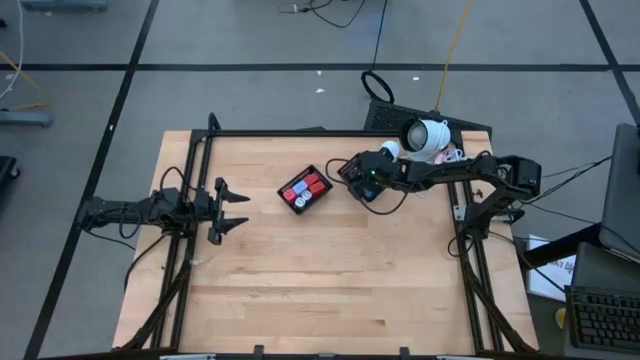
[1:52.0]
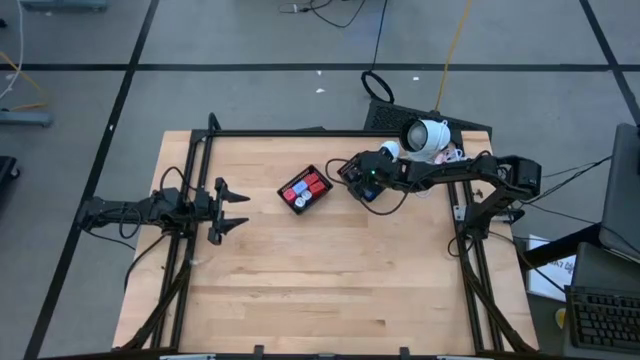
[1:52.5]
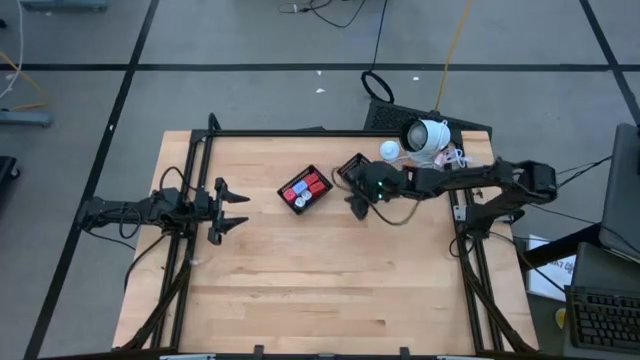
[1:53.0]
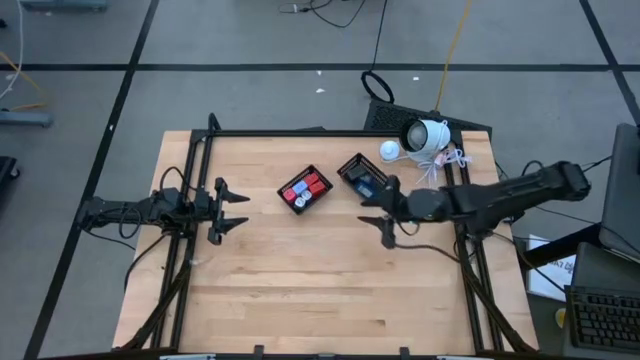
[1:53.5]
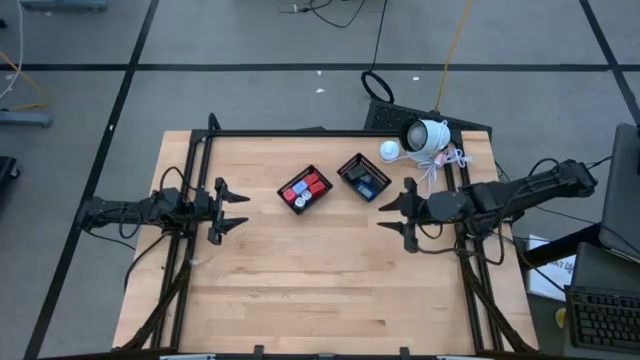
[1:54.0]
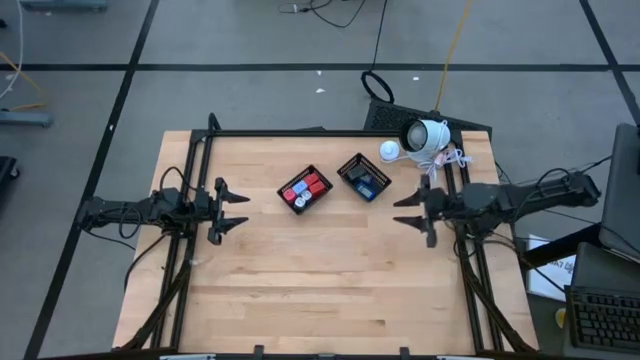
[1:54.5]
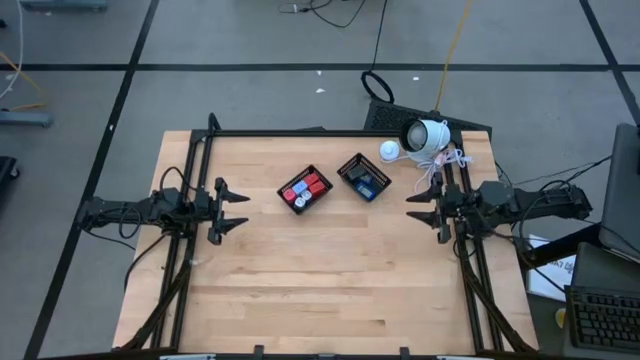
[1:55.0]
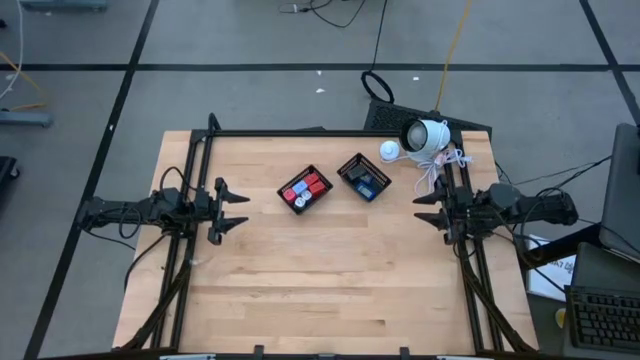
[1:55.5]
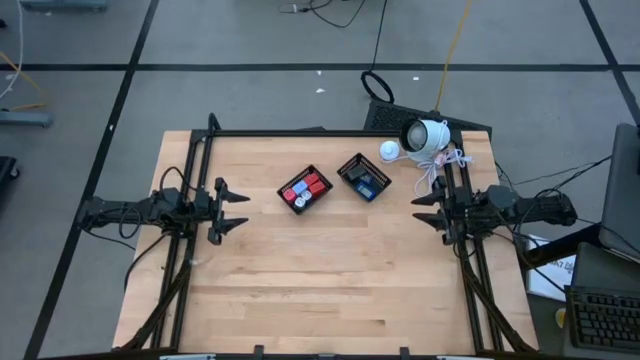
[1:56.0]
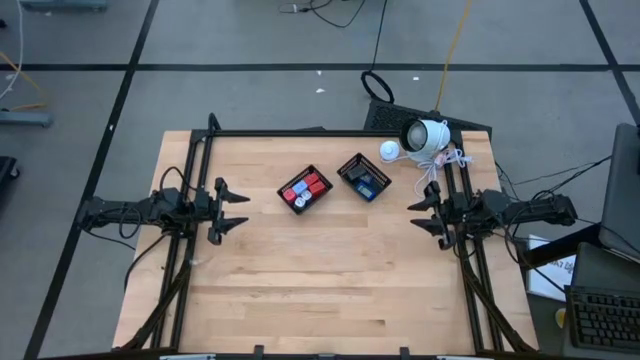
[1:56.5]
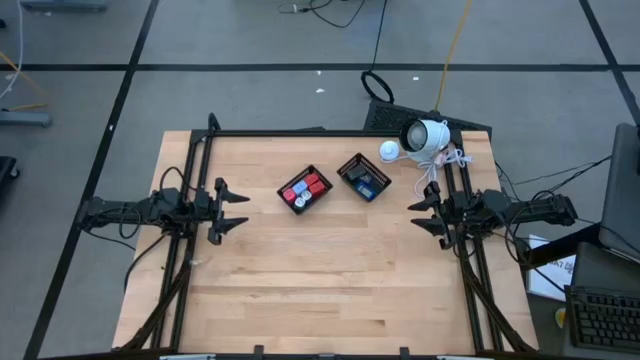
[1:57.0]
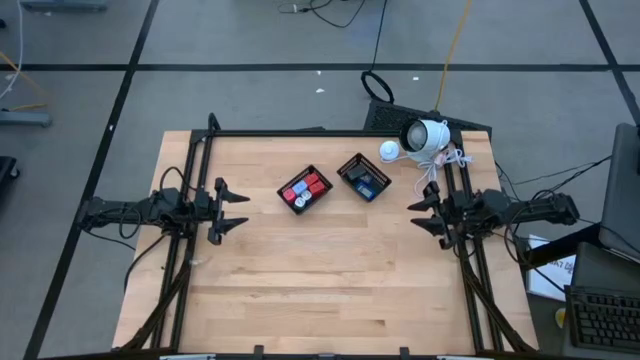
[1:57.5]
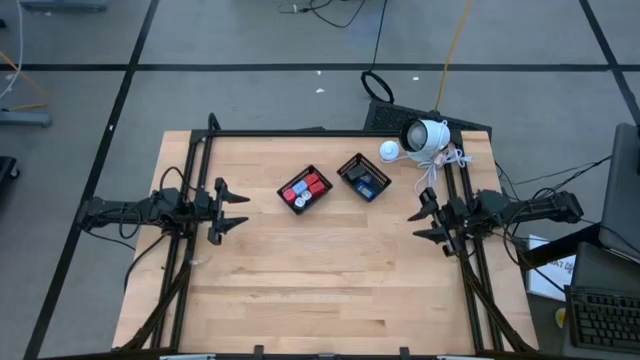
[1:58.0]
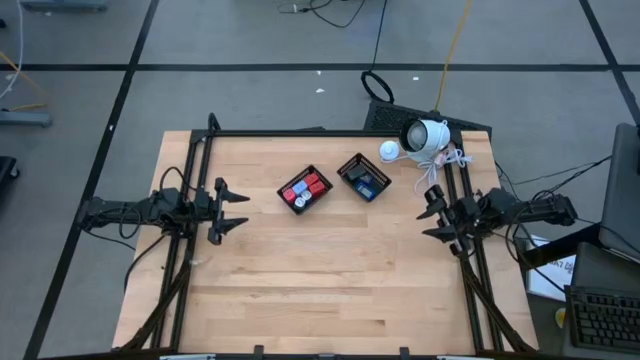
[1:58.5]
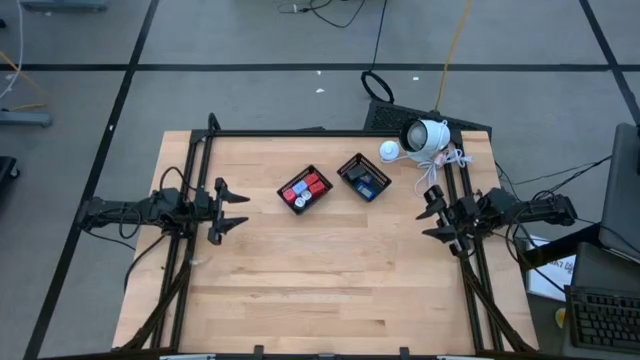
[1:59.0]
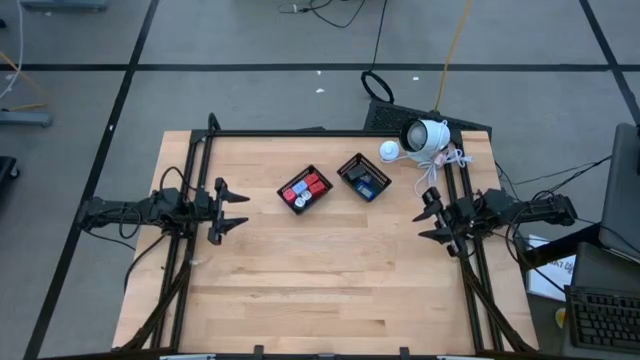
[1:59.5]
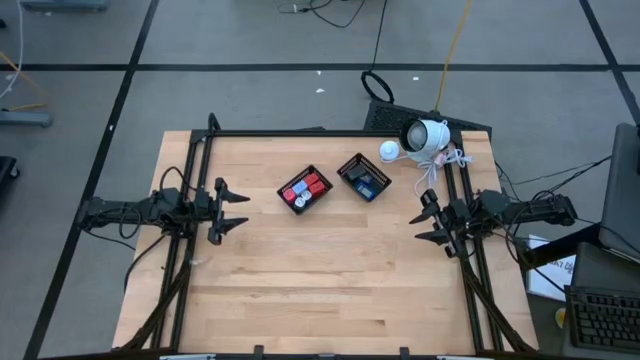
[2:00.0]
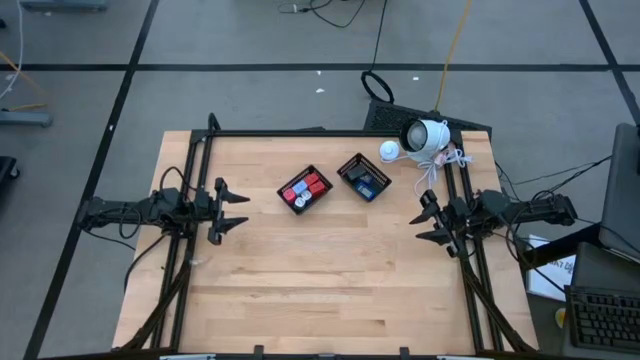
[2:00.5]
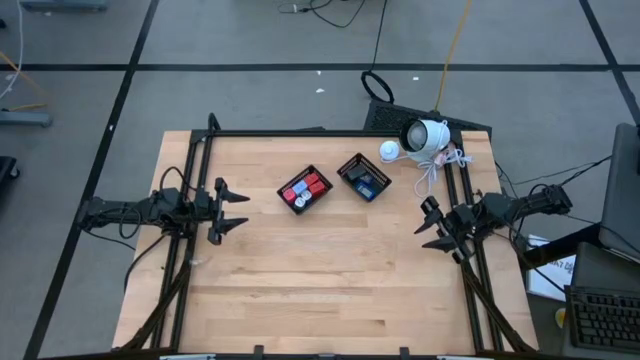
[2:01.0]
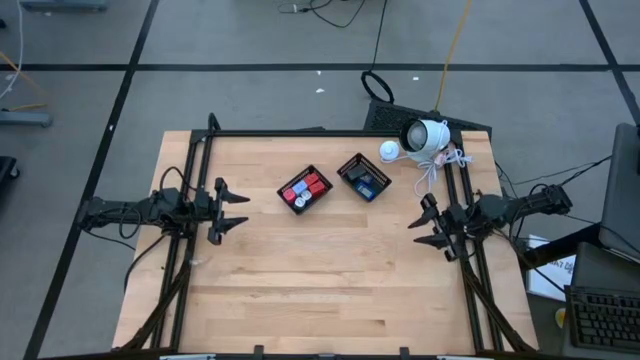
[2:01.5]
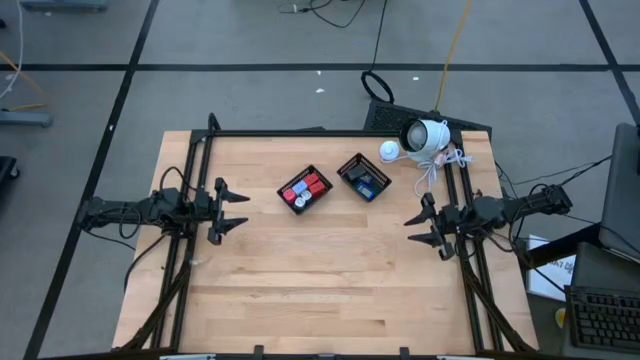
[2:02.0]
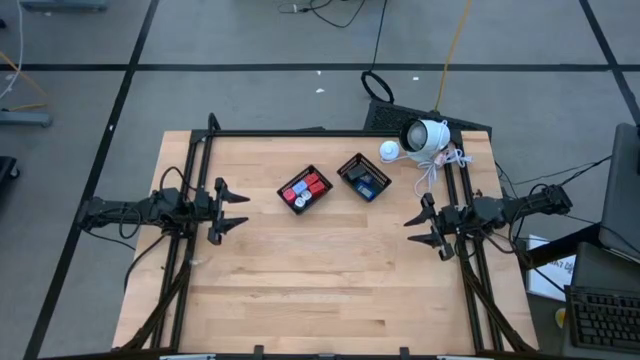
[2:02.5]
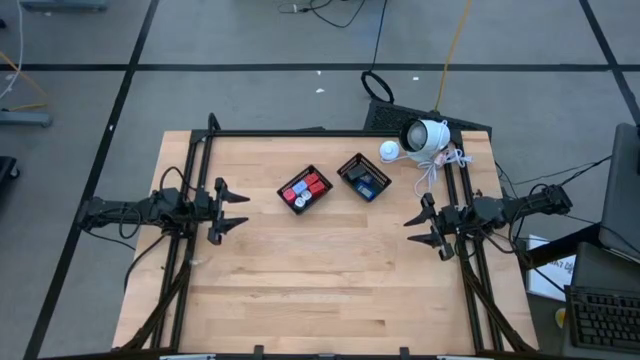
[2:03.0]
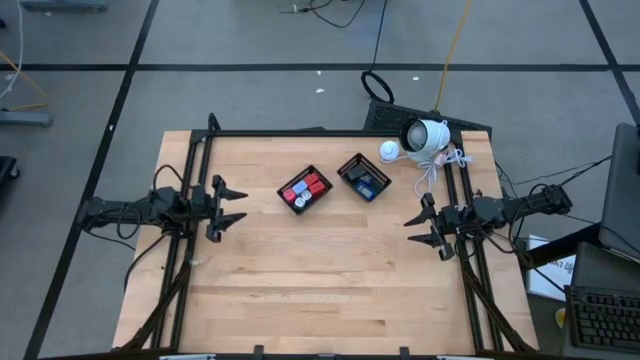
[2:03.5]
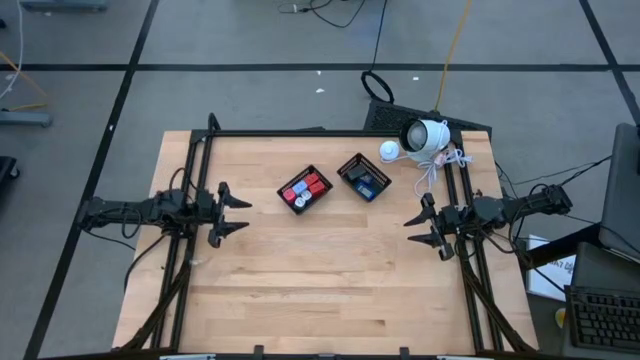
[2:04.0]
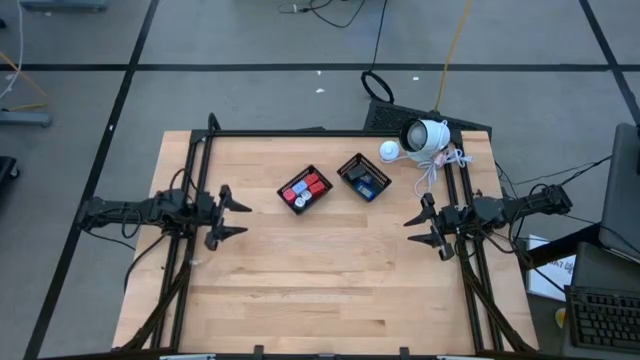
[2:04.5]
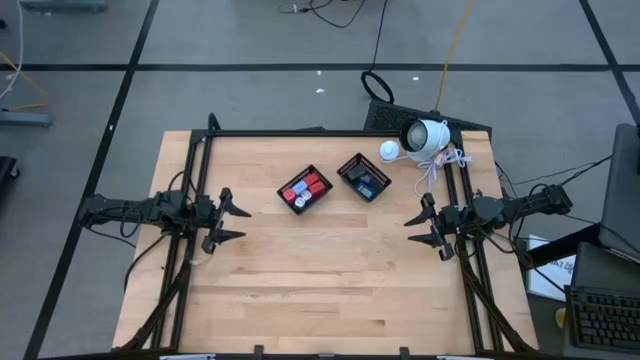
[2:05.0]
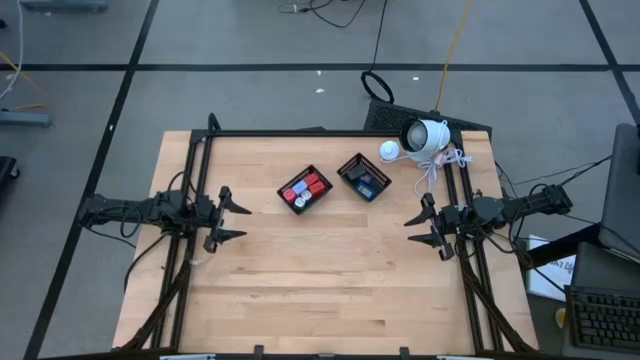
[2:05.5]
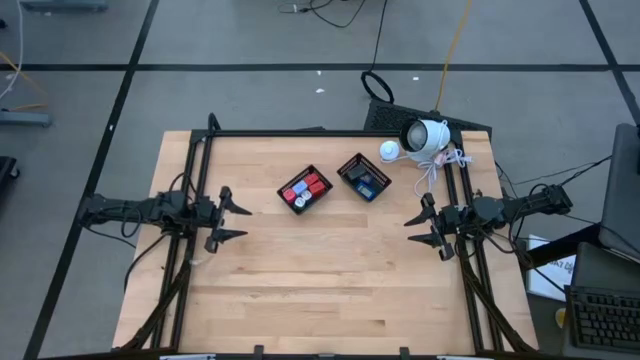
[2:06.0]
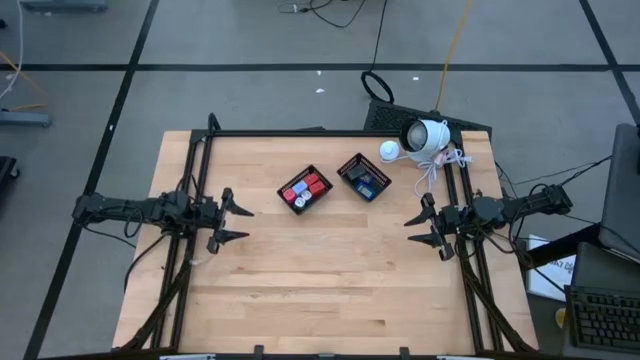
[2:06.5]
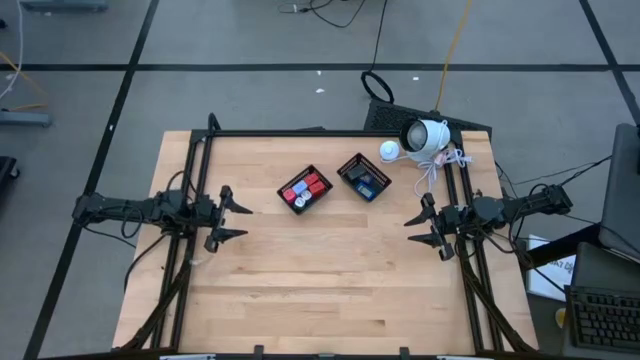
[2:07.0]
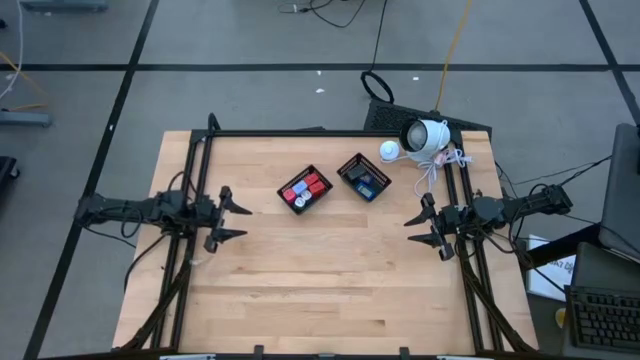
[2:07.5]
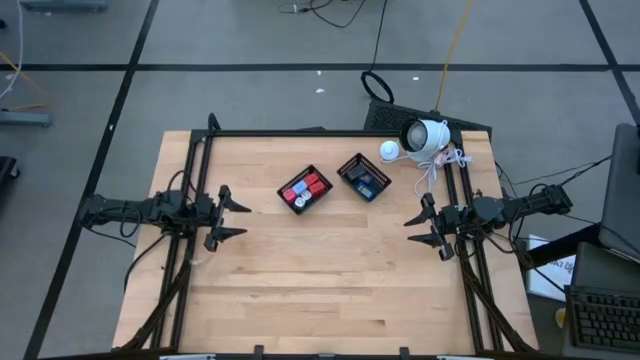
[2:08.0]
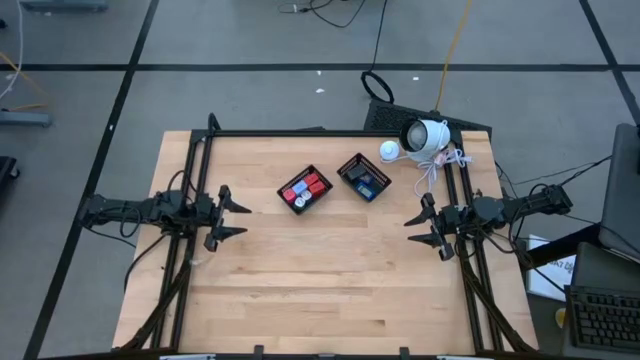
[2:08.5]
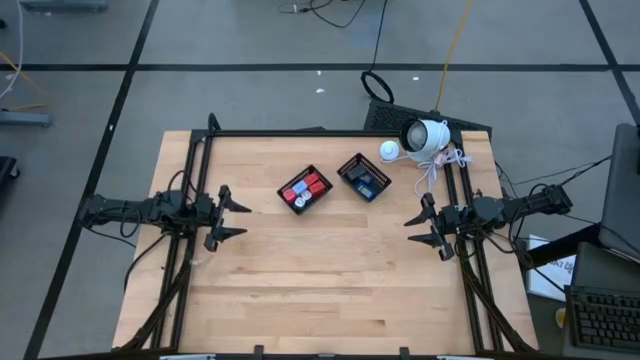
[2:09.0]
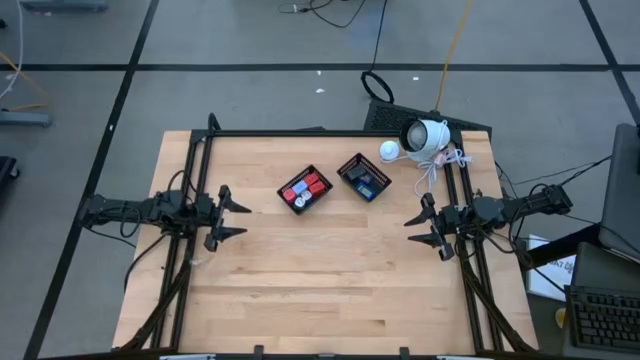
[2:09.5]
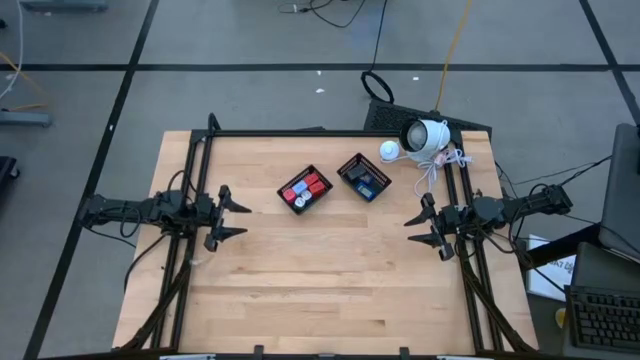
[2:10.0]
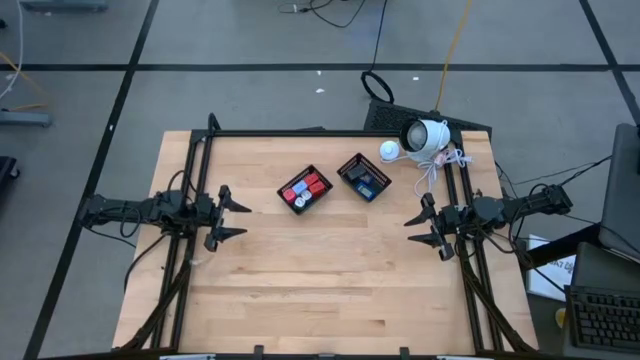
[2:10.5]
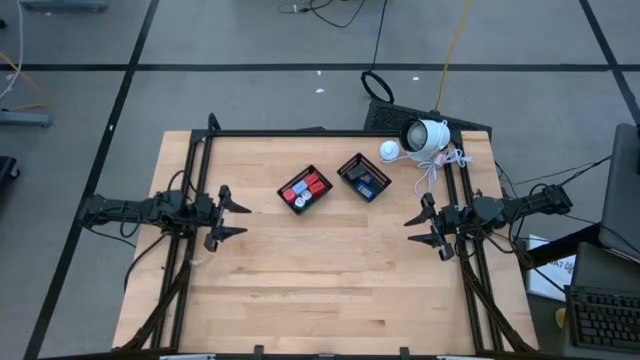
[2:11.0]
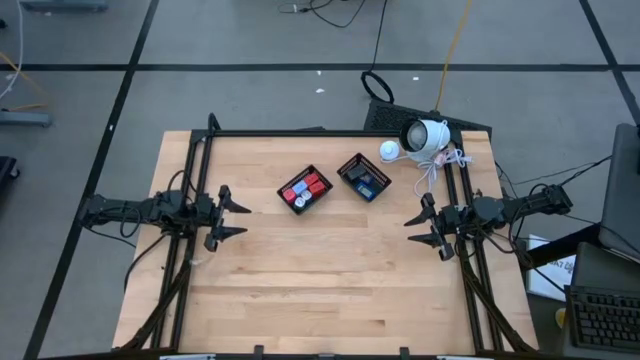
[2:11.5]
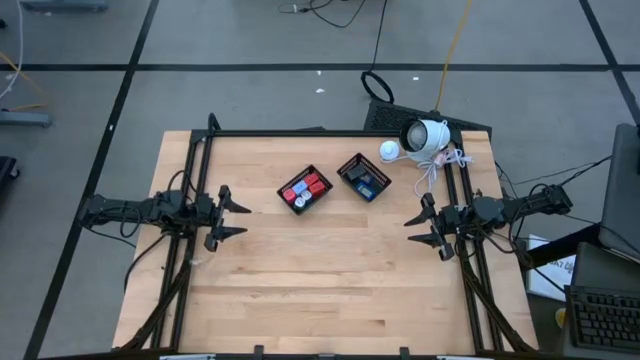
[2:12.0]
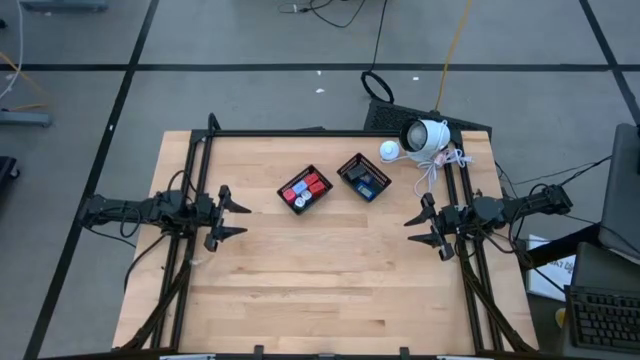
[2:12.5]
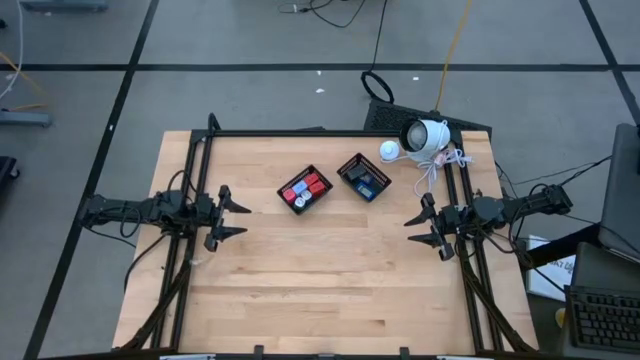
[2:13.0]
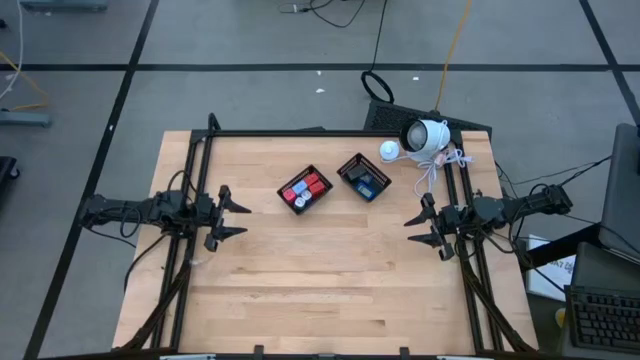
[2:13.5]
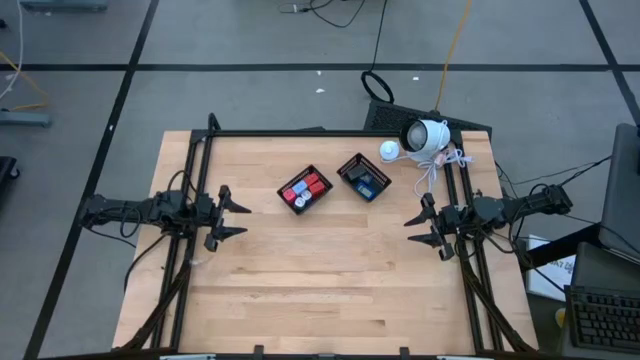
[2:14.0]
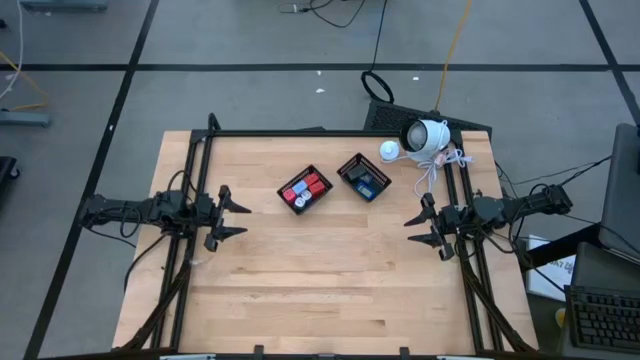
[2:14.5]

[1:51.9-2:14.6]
Task: Pick & Place Office items
Return to Home Position
